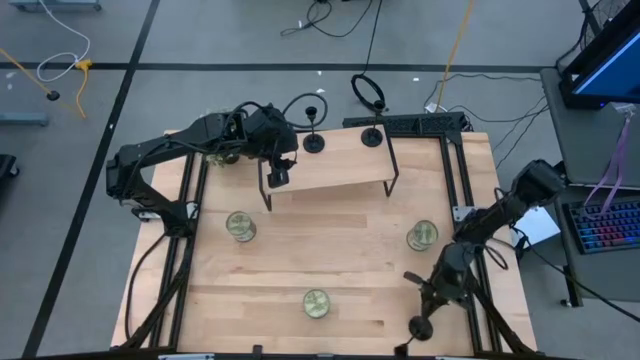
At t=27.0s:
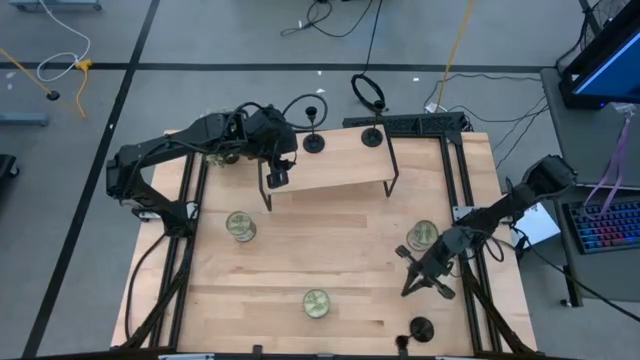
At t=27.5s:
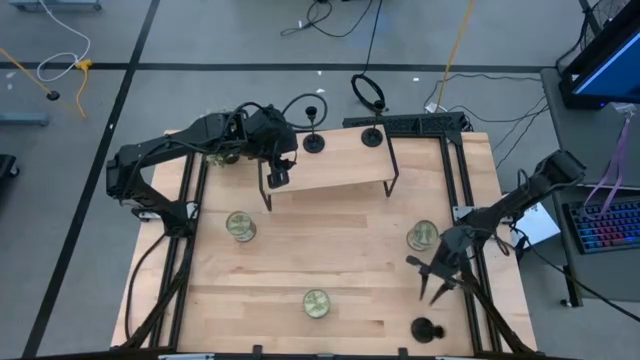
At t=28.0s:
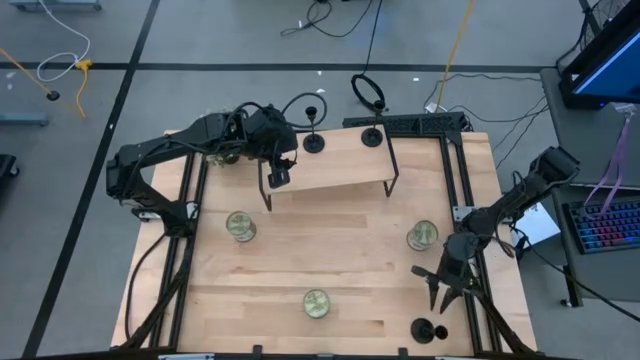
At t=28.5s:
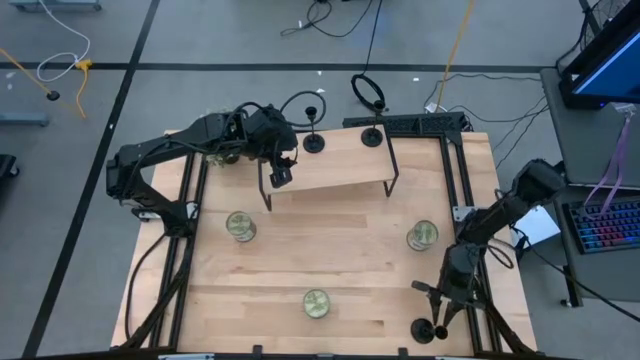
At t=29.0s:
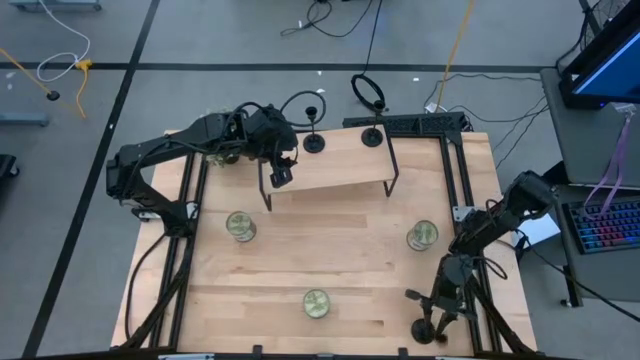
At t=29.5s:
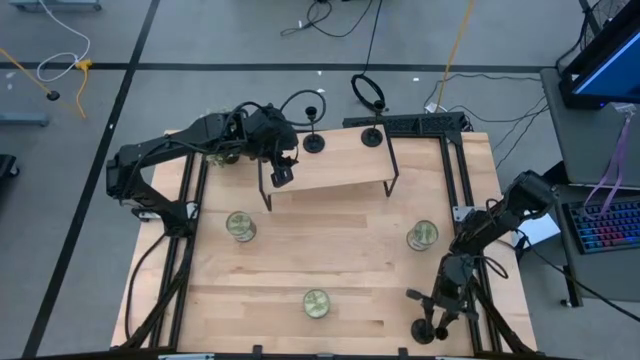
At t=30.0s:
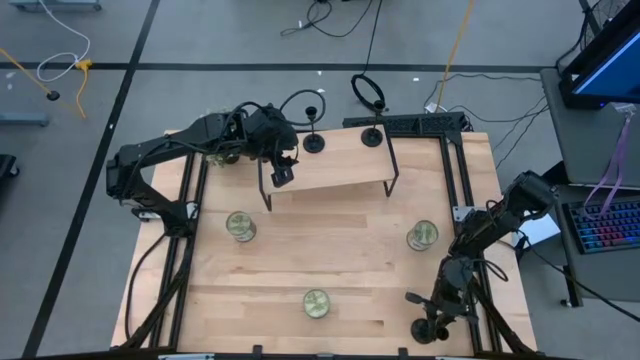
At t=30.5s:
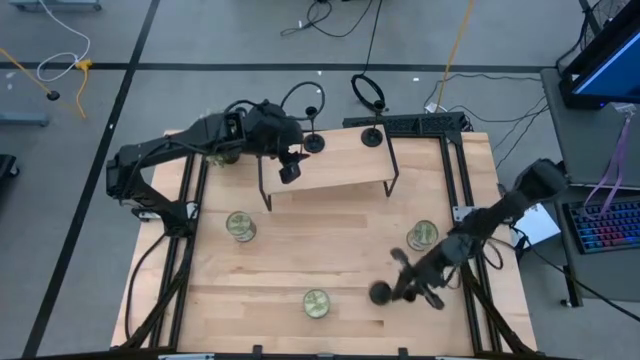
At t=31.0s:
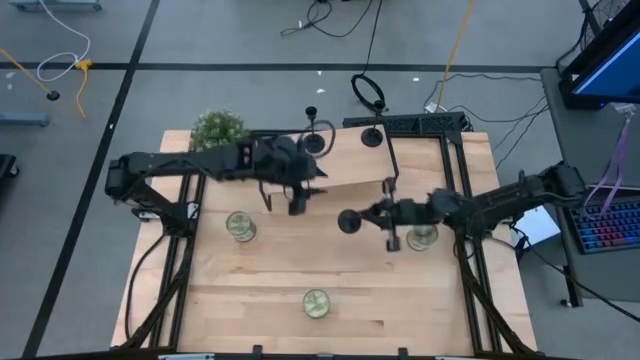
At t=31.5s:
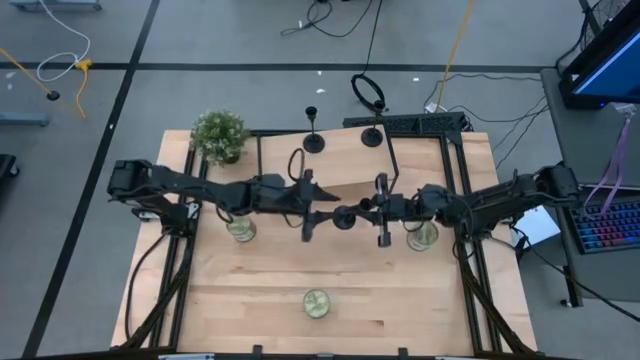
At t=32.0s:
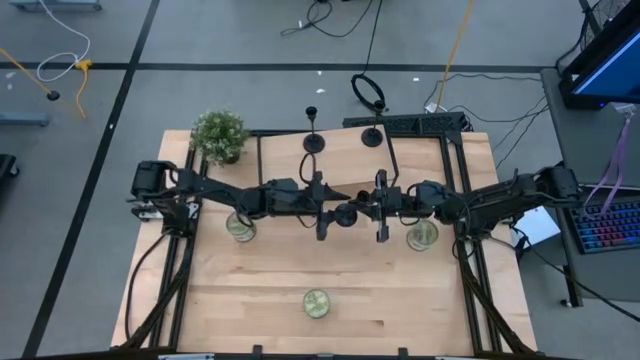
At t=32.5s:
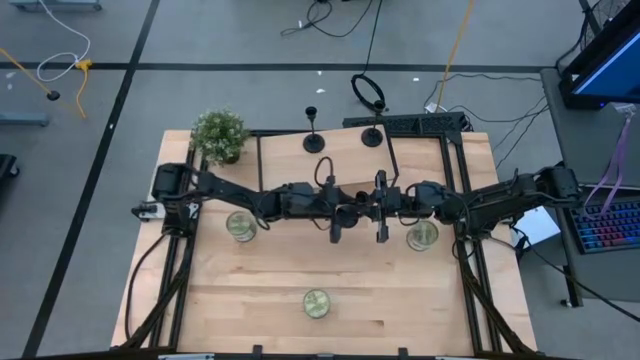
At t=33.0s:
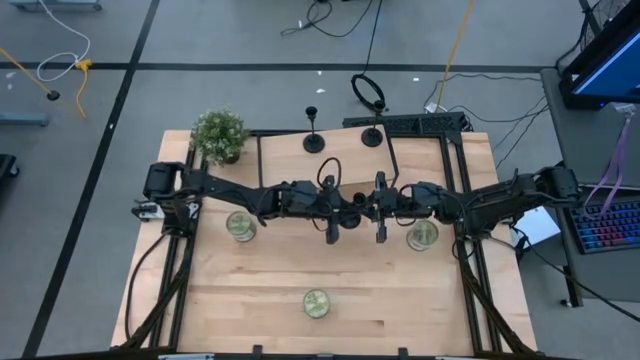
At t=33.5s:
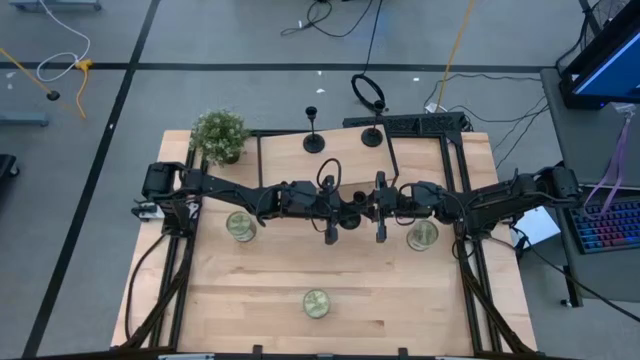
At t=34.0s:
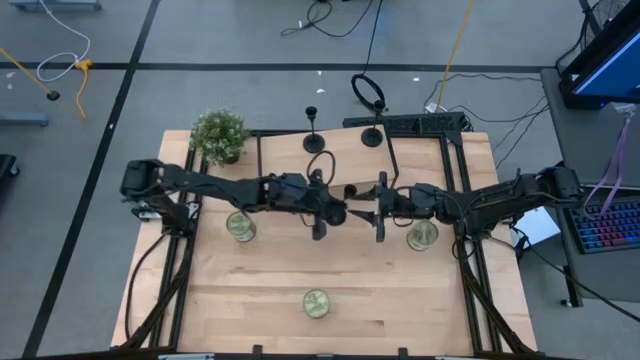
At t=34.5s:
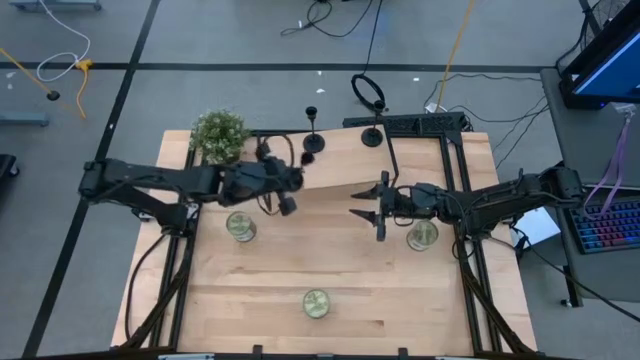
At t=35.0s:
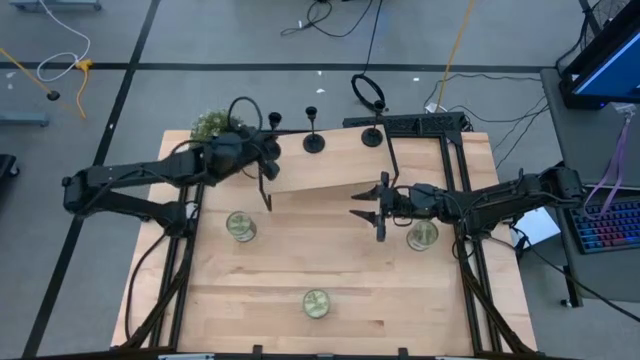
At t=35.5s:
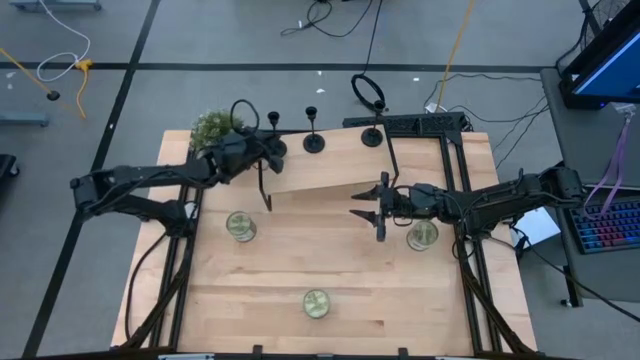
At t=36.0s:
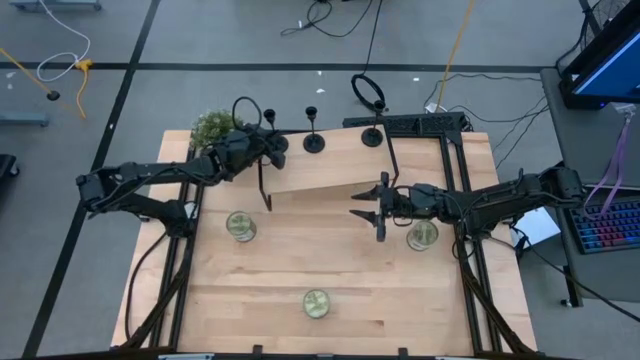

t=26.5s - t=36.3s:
Task: Pick & Place candle stick holders
Put the black candle holder on the shelf aligned with the black candle holders

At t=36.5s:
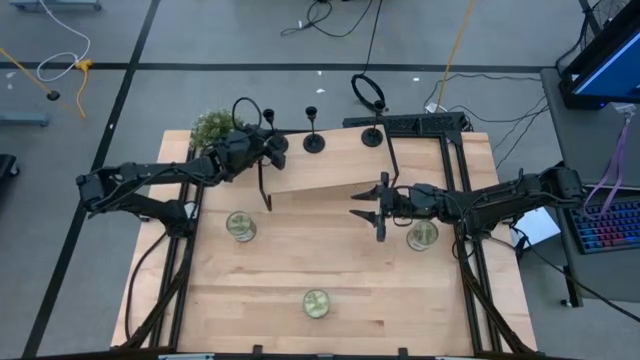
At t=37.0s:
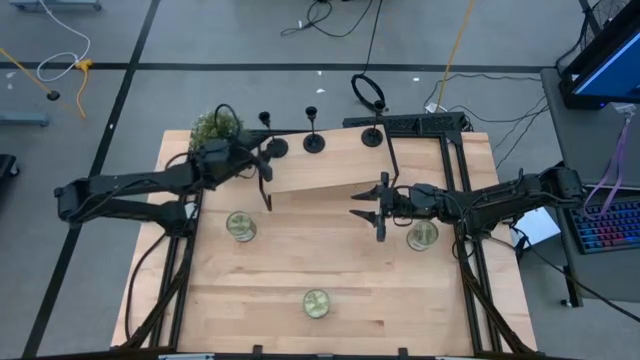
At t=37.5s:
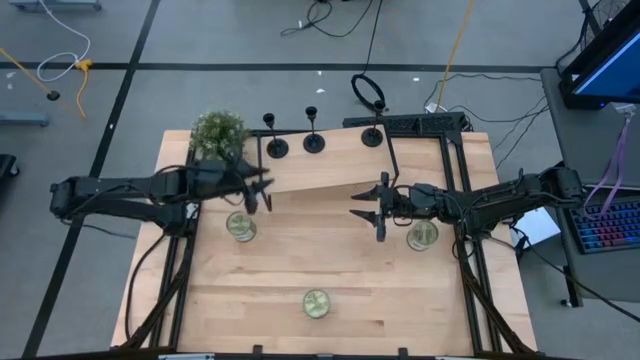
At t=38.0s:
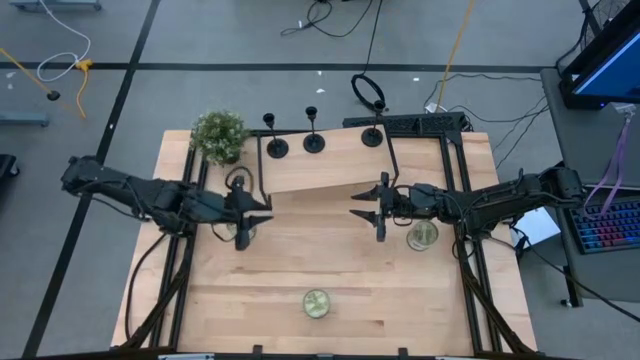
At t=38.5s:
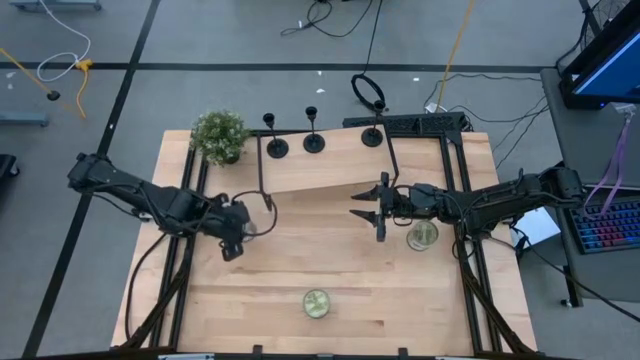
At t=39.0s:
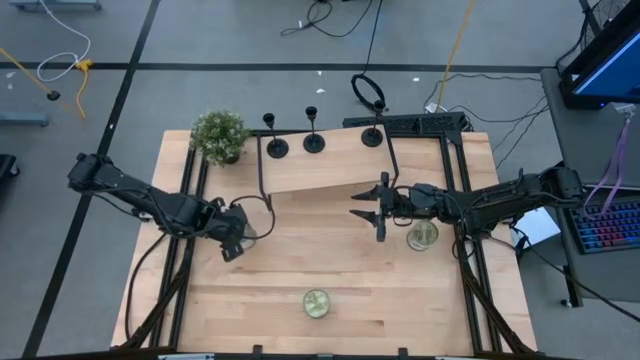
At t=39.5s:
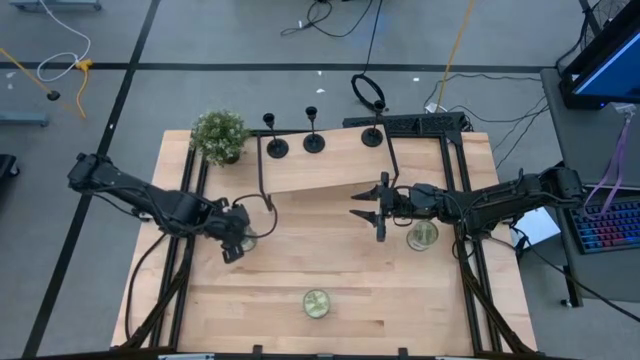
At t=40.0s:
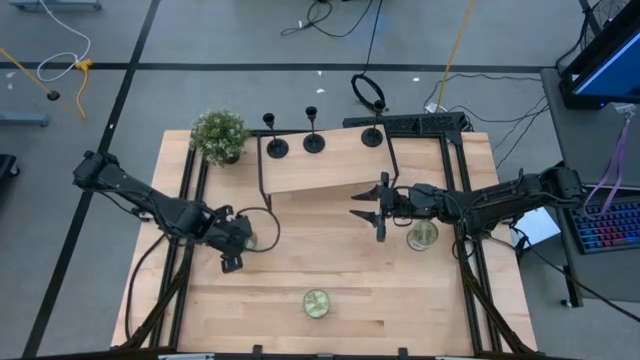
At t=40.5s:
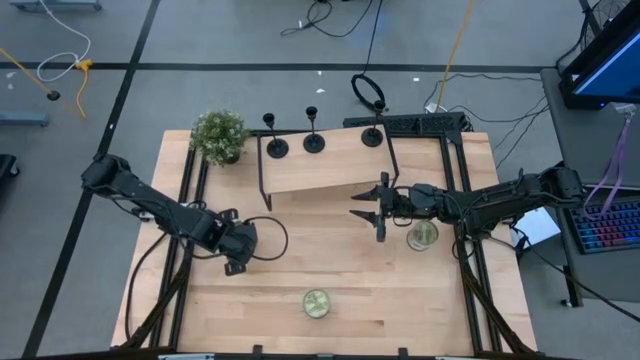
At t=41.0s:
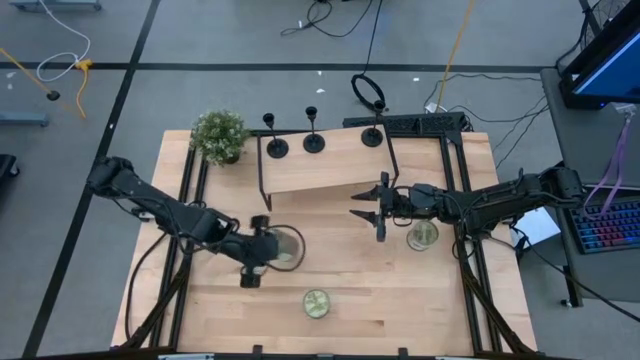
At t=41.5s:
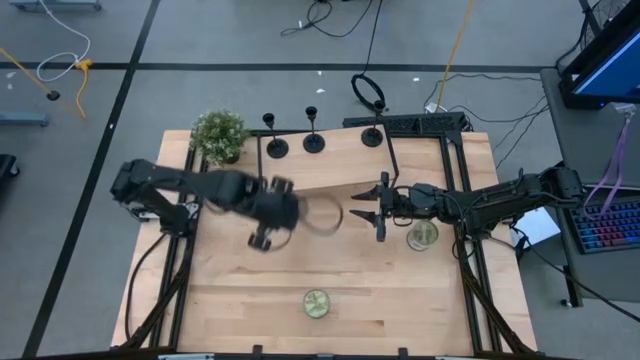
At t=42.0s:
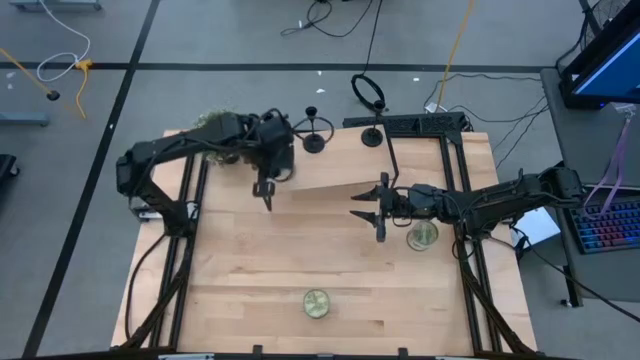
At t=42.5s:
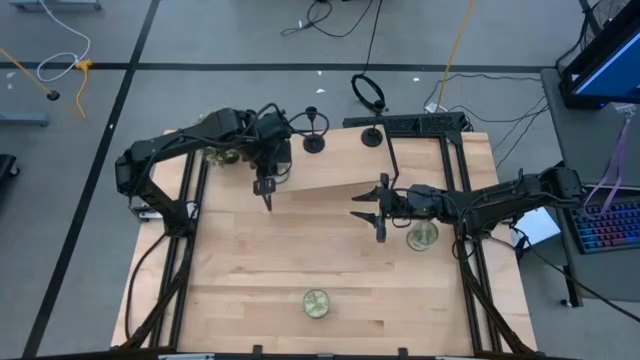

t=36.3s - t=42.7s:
Put the top left silver scented candle on the shelf

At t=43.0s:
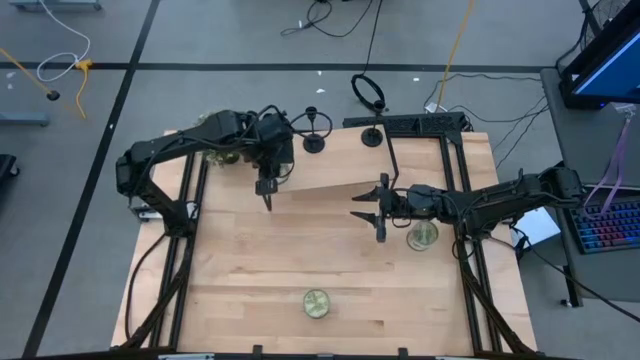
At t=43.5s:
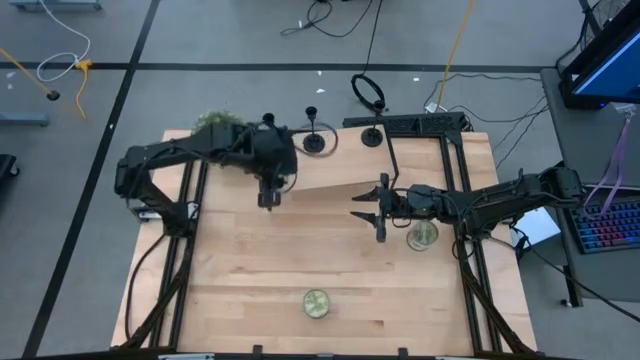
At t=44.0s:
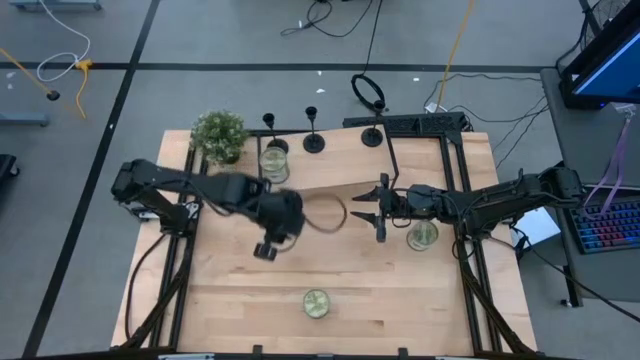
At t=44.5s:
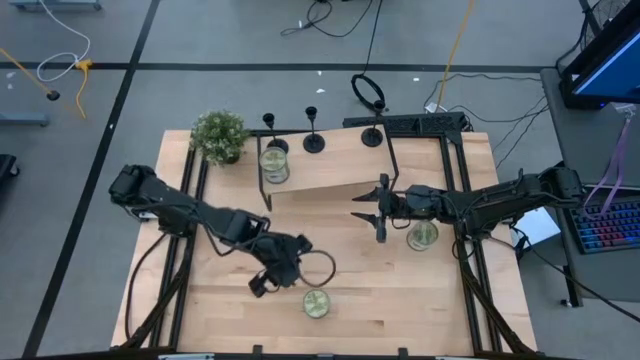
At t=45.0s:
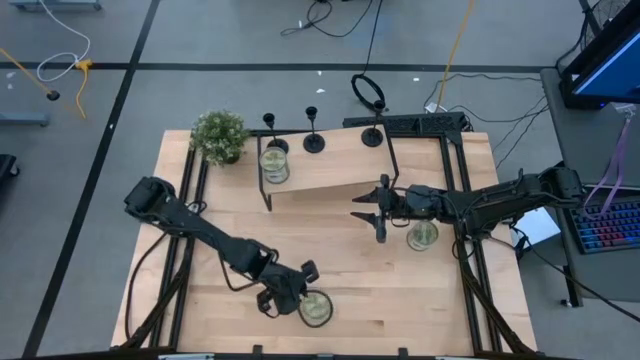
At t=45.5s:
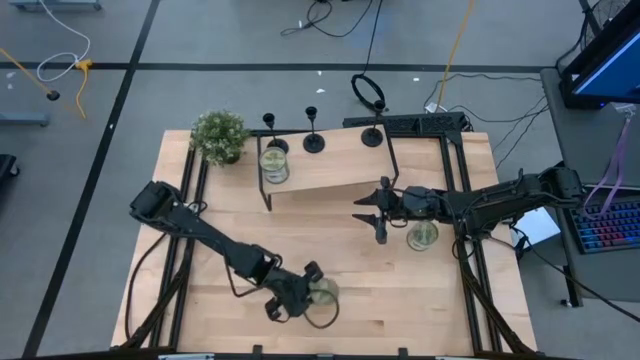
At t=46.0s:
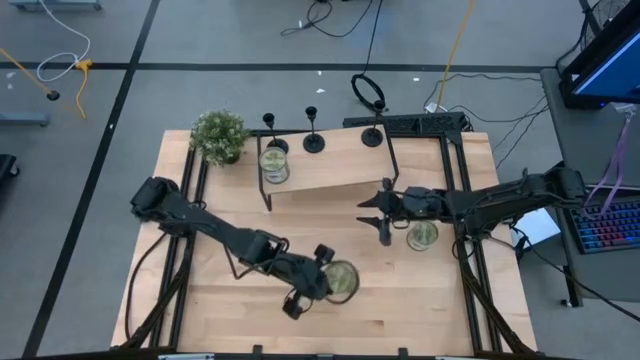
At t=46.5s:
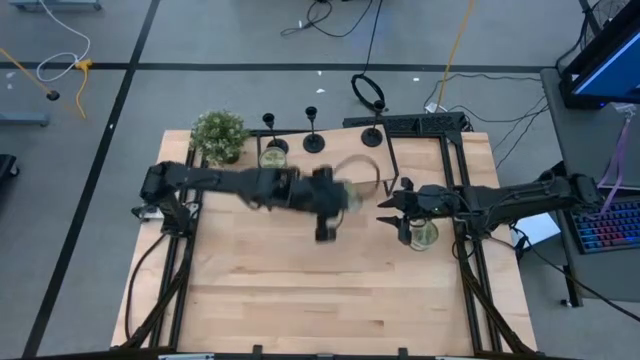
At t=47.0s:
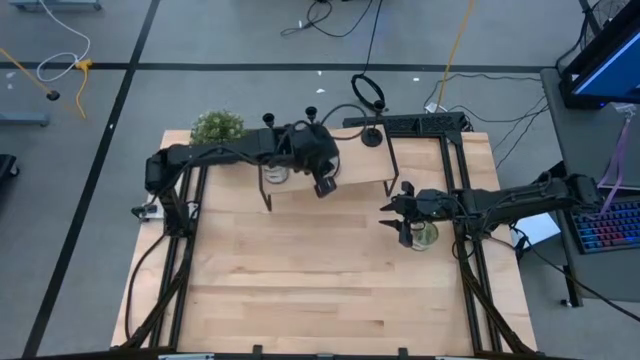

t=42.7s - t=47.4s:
Put the bottom silver scented candle on the shelf aligned with the silver scented candle
